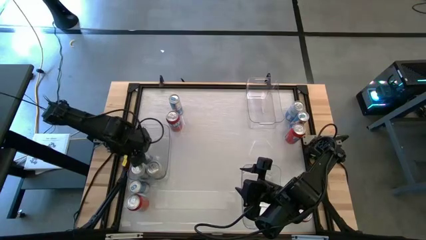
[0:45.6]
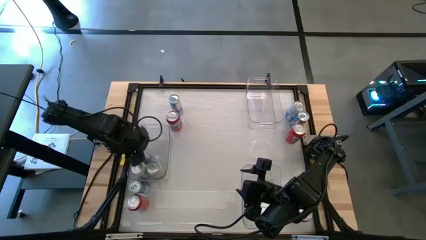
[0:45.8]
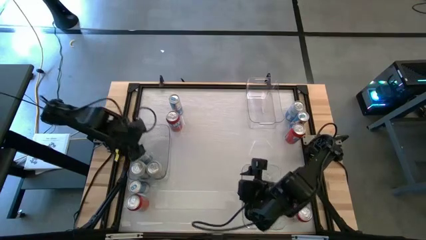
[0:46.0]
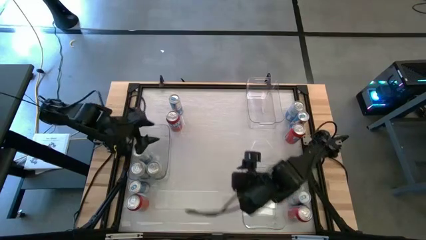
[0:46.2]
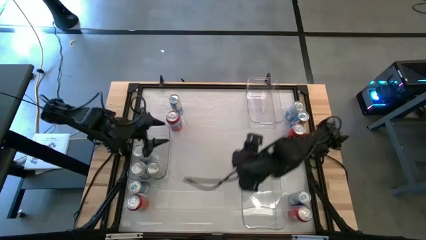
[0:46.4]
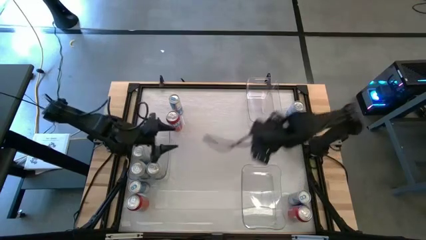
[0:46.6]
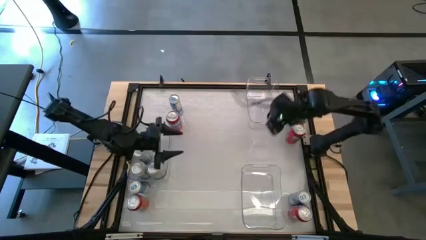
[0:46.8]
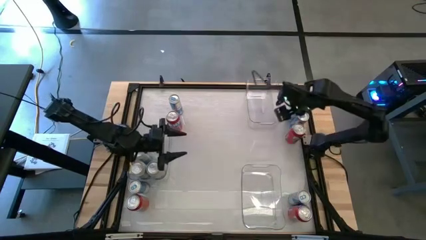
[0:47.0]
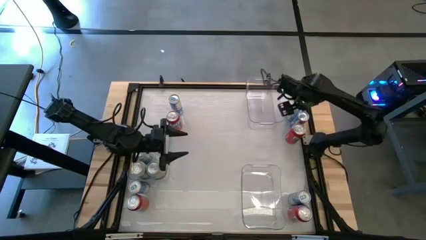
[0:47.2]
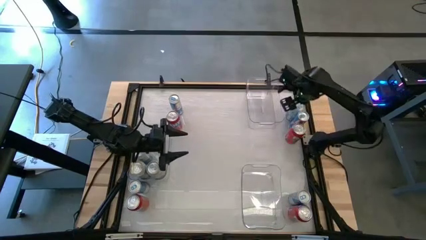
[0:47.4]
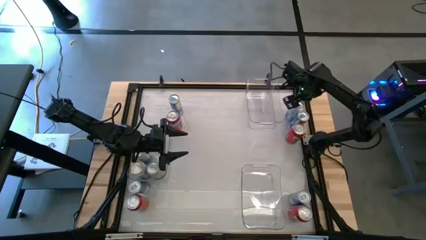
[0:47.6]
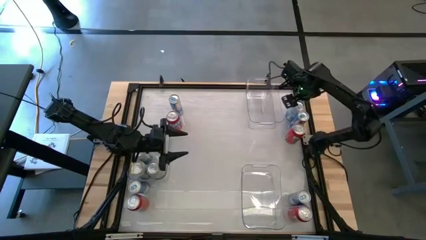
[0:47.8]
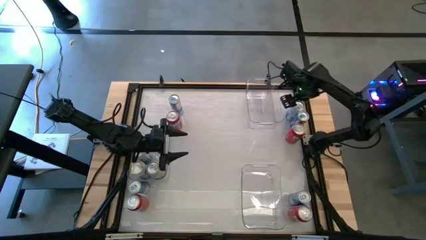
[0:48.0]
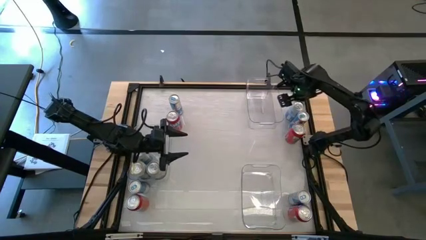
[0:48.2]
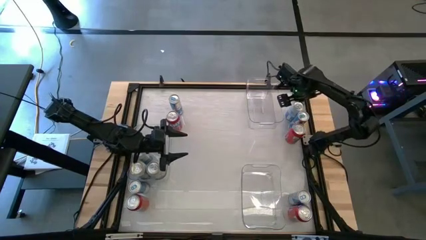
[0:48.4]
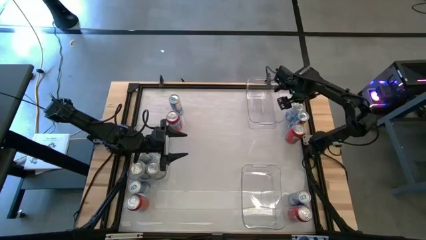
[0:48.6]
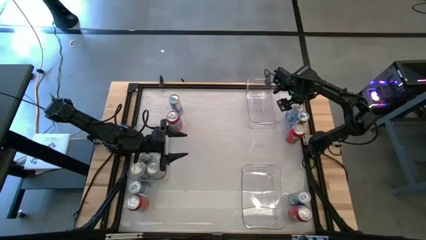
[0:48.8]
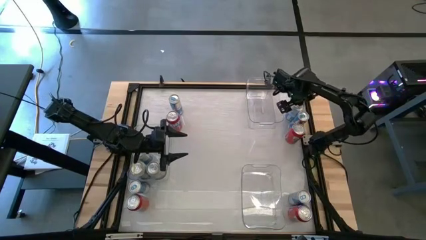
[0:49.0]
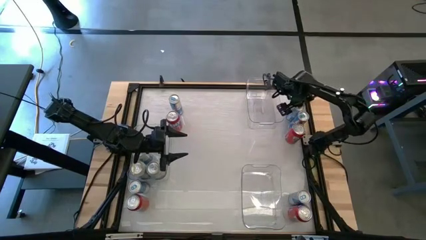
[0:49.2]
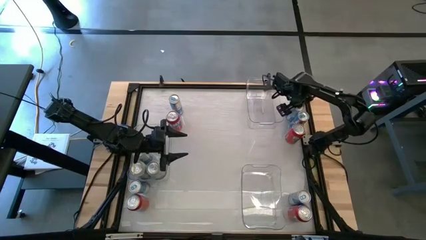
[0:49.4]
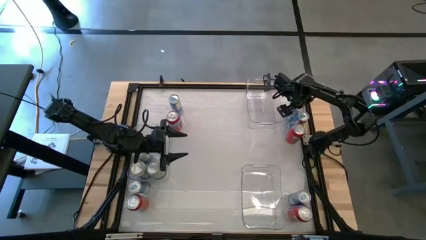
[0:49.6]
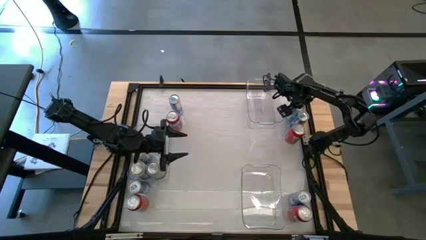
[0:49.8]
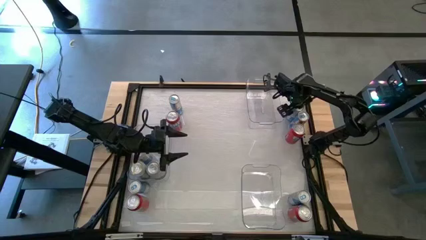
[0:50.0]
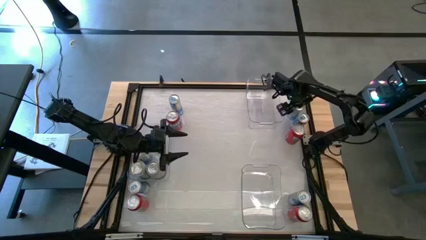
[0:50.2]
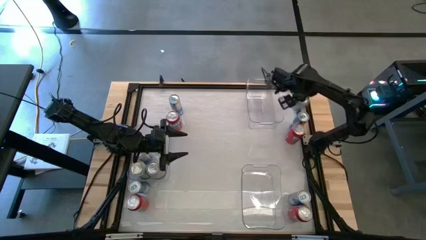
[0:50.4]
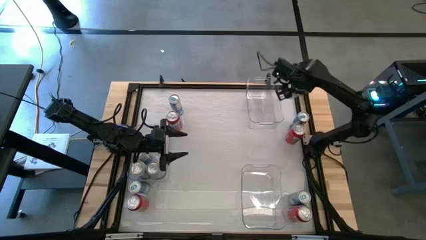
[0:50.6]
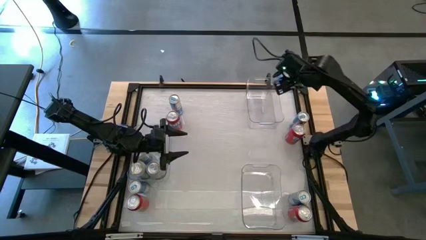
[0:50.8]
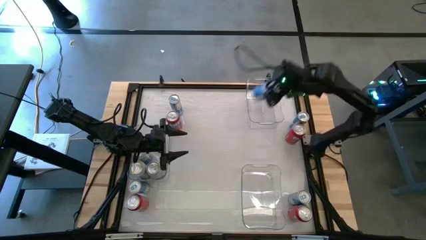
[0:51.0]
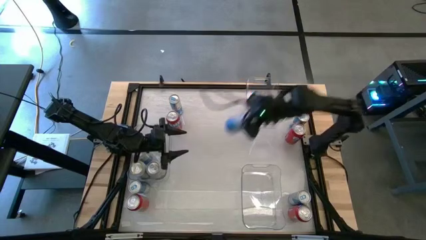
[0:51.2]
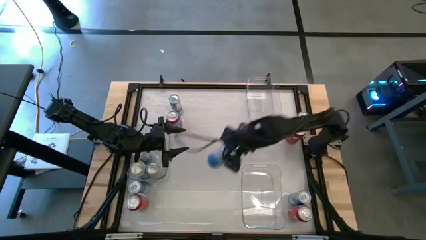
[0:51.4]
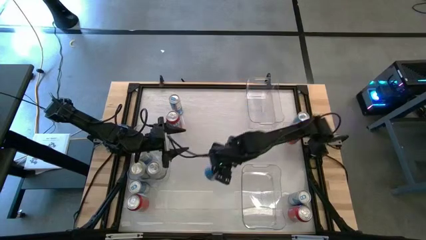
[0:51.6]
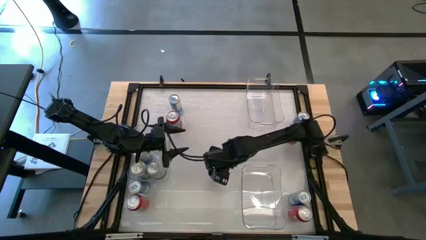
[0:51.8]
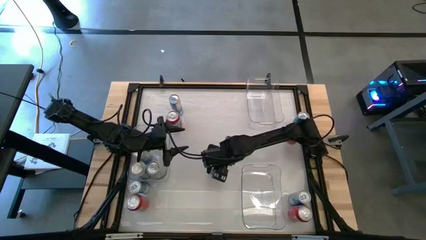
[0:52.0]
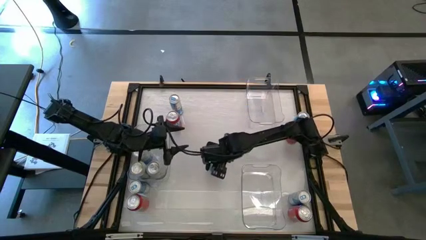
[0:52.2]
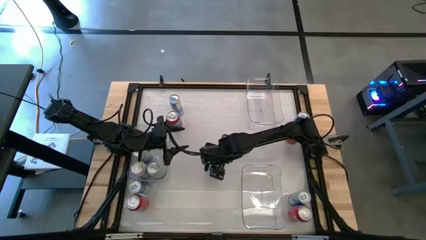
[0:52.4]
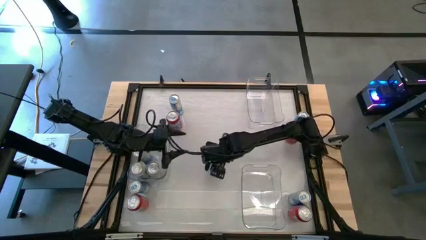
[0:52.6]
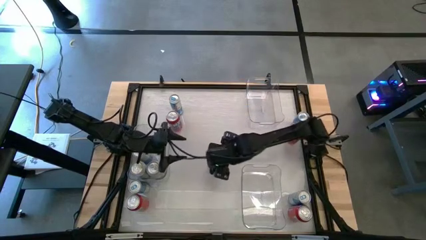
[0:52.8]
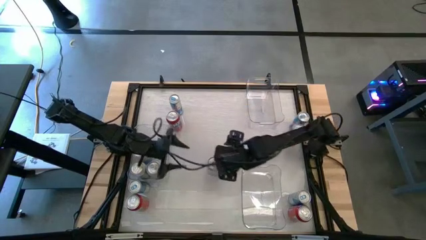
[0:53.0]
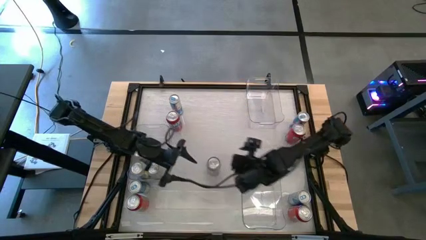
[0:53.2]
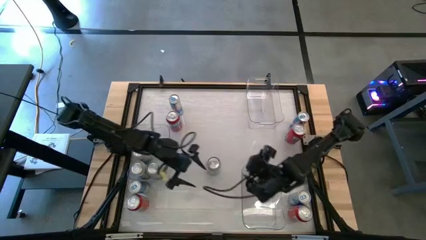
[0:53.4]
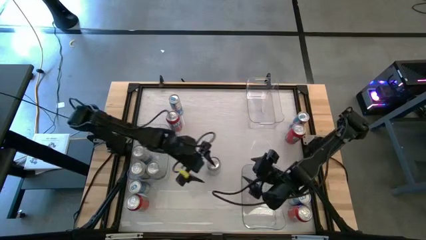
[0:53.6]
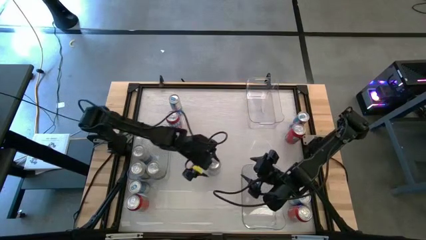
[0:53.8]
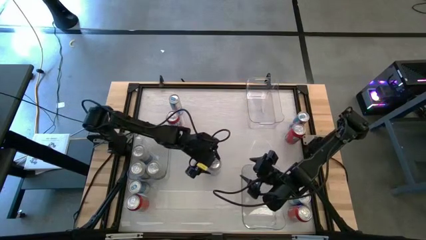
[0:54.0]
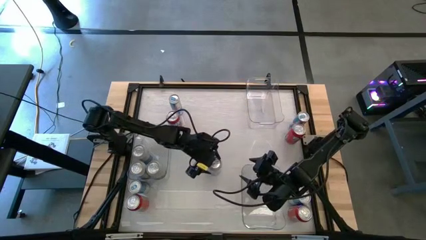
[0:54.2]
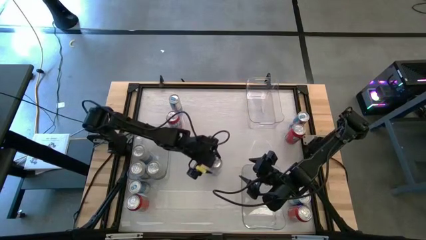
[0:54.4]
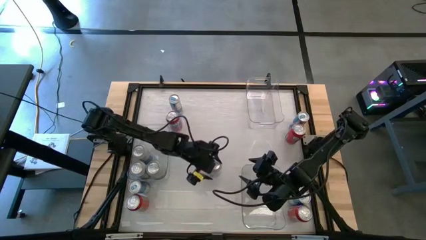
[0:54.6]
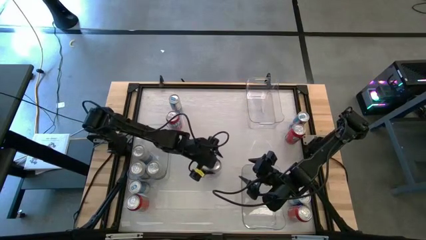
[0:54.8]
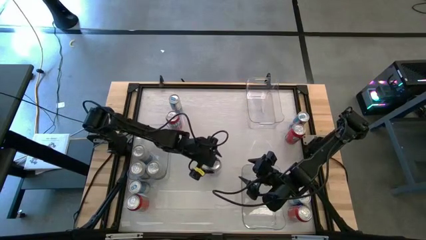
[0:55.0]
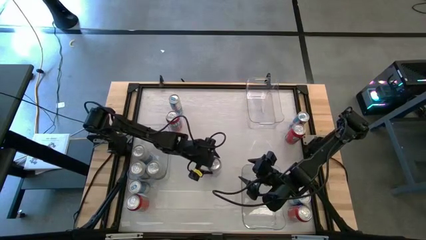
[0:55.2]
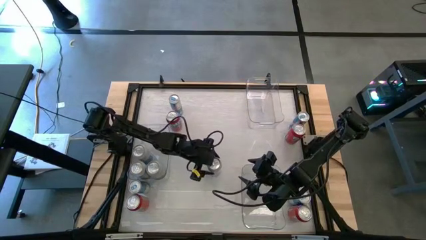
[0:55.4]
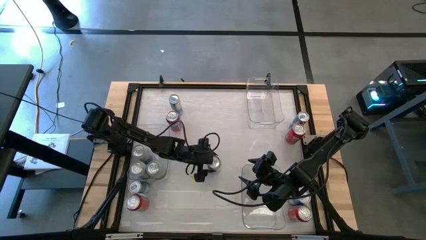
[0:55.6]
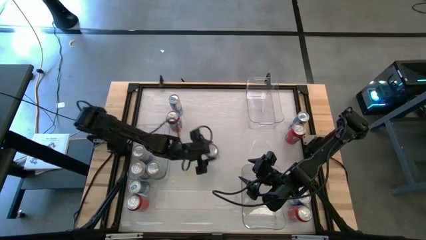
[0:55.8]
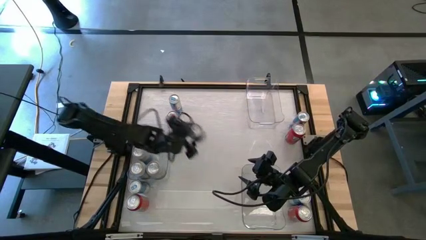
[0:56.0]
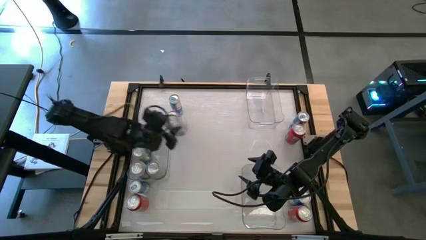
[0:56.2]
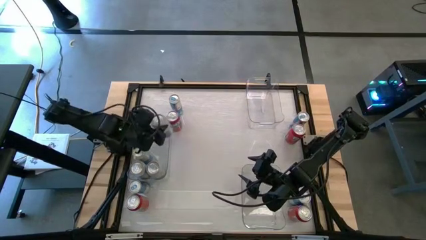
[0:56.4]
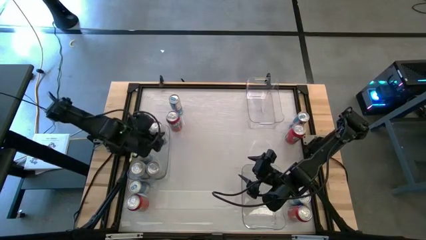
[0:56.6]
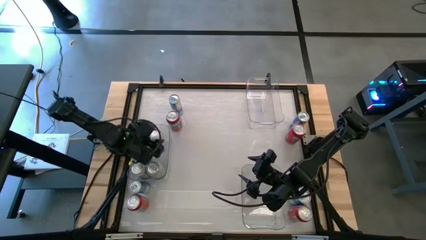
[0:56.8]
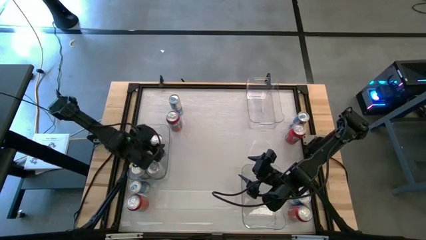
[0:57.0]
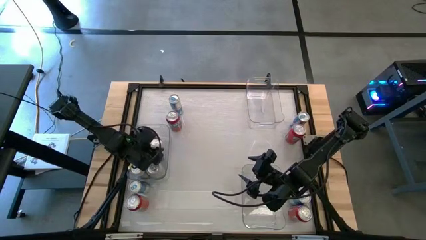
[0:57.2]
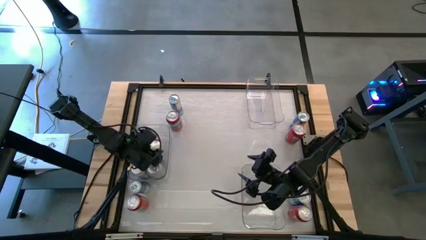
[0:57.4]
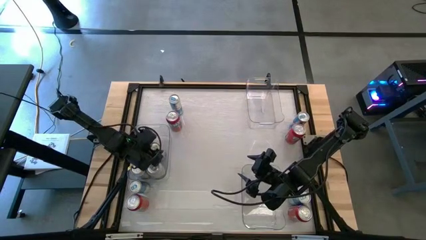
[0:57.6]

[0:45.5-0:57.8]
Task: Sort soda cans
Put the blue and white soda can into the middle left transparent bin

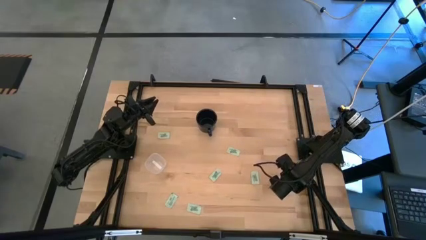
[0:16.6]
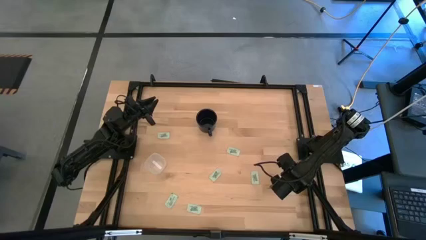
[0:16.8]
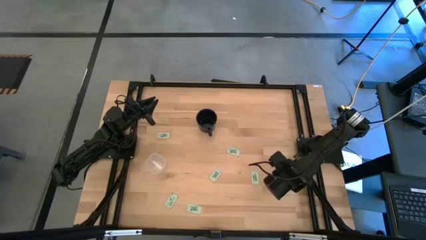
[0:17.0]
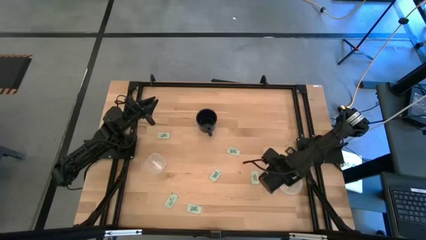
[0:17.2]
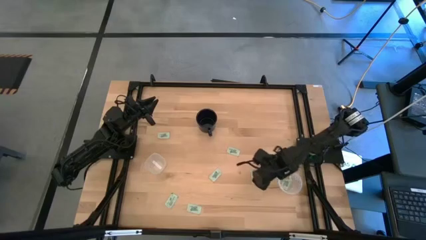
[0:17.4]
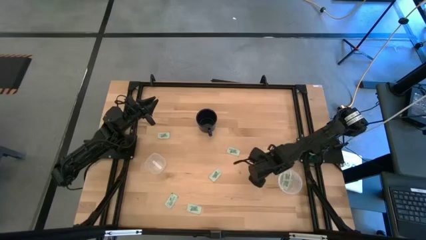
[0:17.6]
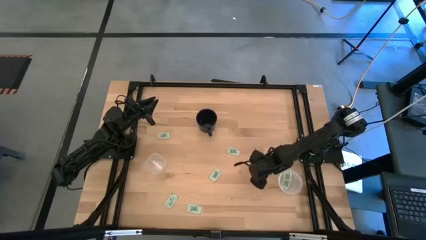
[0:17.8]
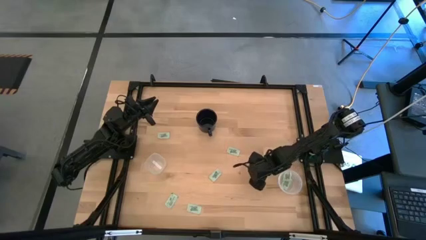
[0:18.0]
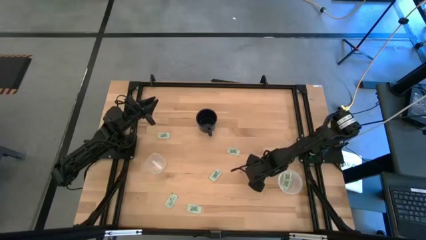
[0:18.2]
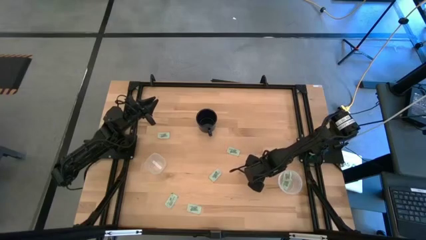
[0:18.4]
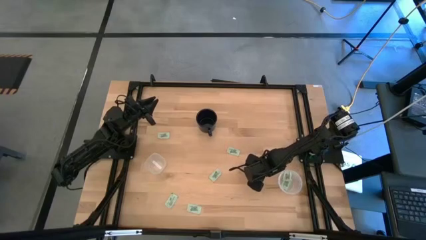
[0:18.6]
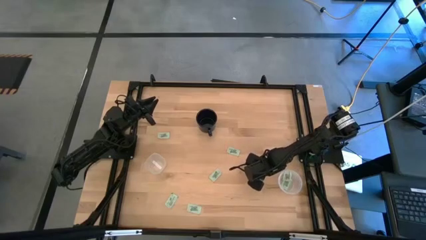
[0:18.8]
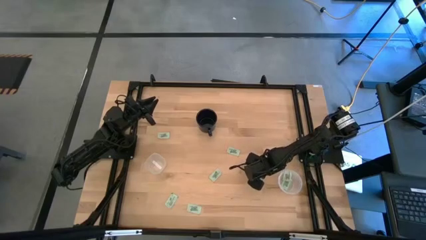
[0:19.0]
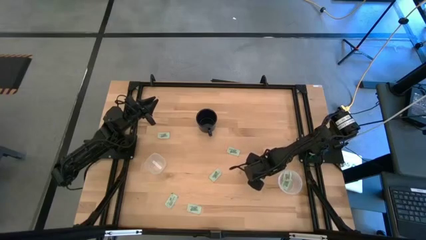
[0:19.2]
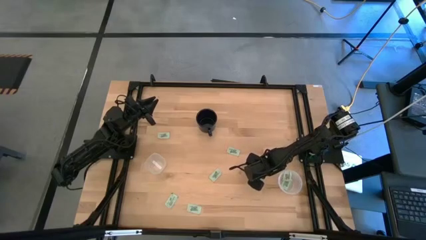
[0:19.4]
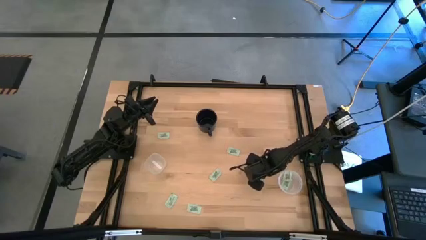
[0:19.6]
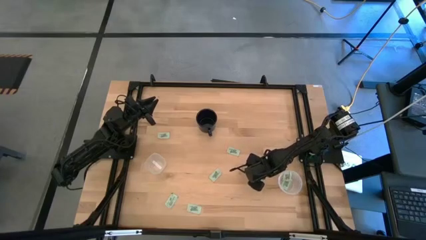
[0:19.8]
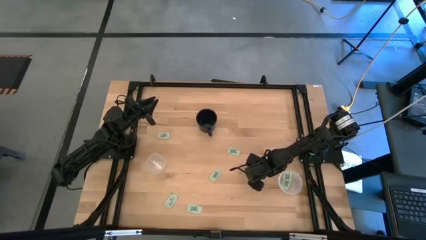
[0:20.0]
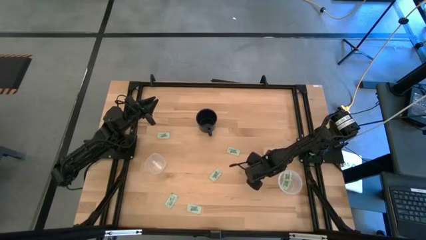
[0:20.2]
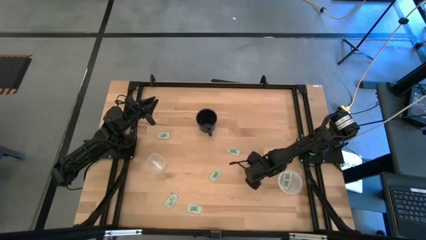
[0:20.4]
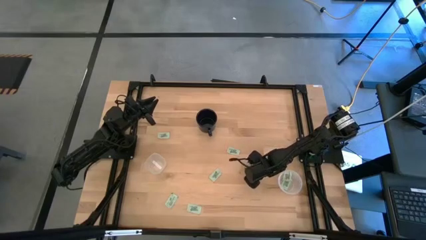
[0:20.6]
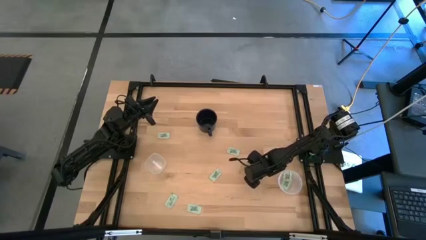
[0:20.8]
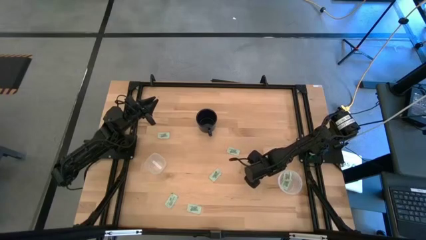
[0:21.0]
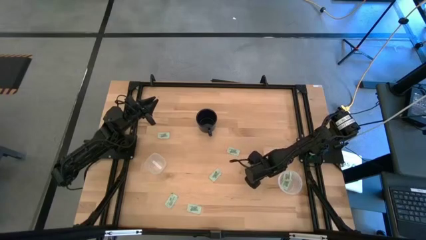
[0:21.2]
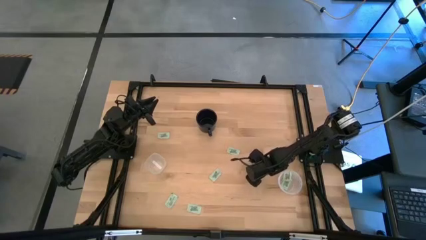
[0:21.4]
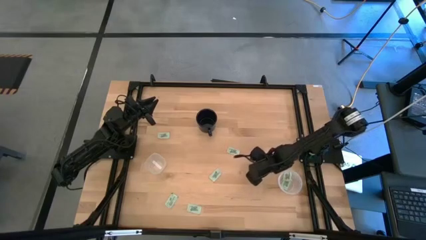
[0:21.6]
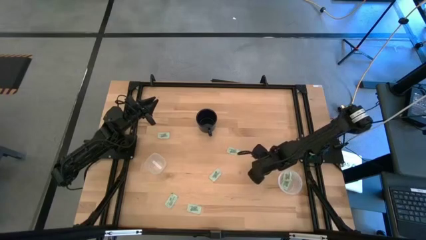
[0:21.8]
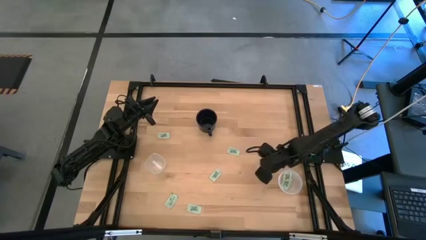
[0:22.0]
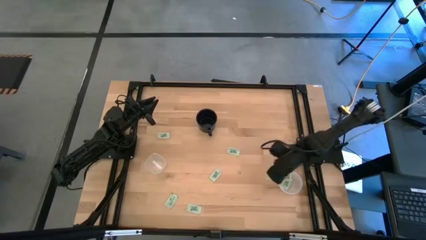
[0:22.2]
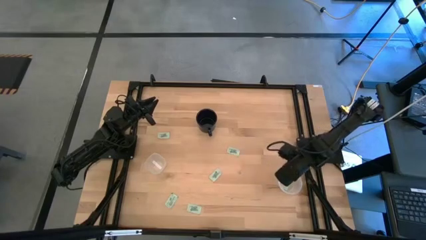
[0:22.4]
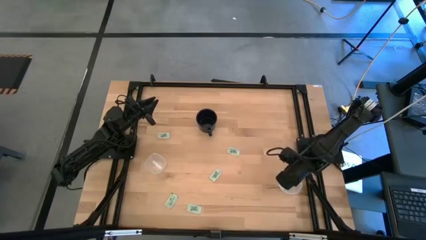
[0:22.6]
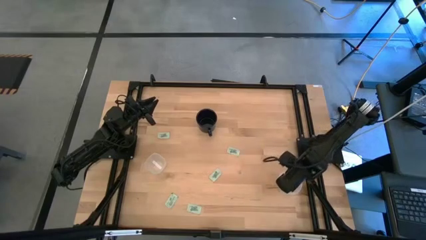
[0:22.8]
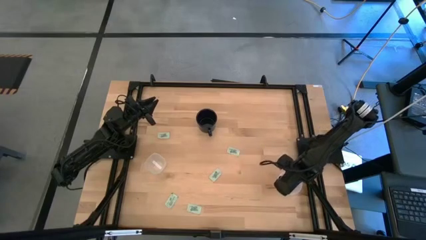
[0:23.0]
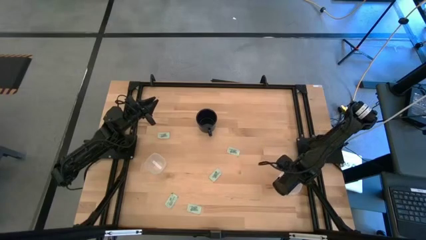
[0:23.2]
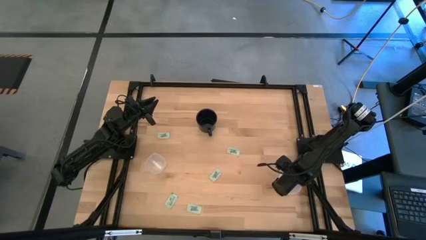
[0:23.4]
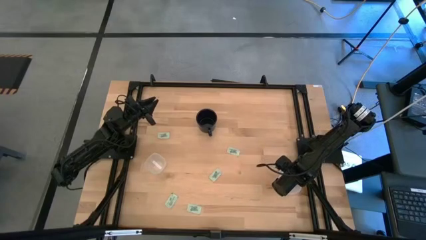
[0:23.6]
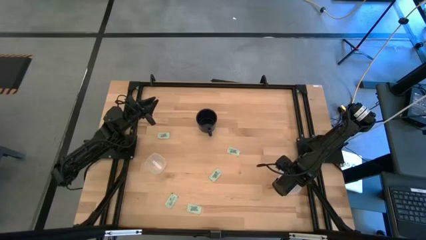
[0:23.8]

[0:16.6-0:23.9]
Task: Pick and place Stevia / Truvia into bins
Put the stevia packet into the right transparent container
